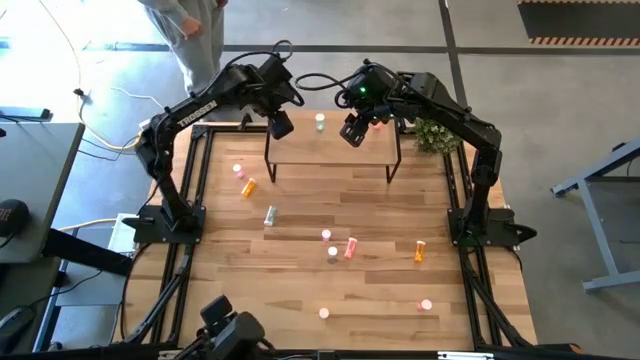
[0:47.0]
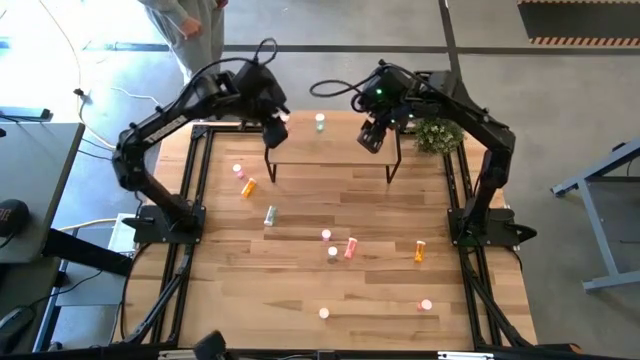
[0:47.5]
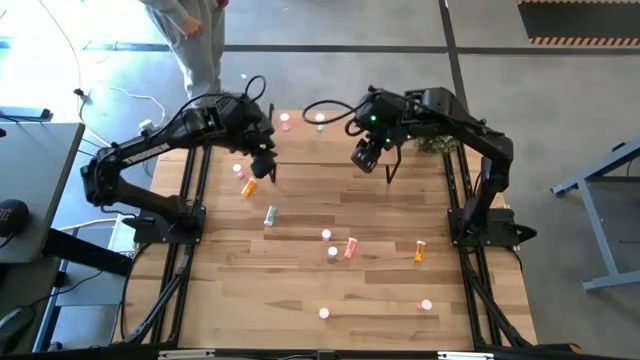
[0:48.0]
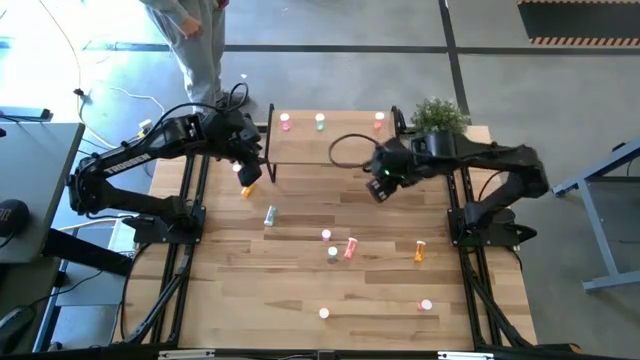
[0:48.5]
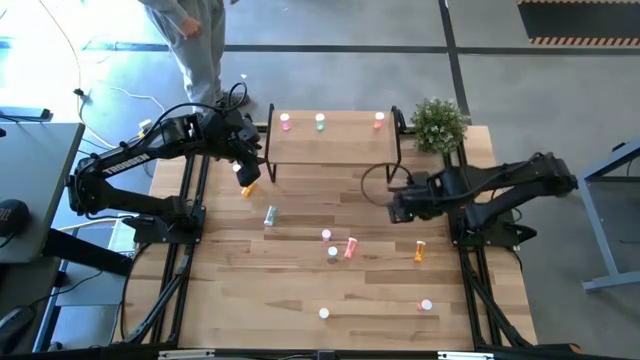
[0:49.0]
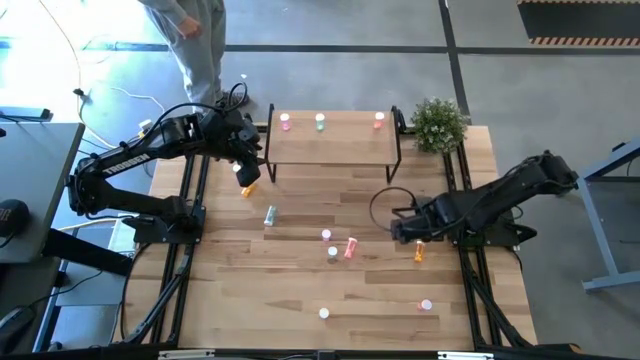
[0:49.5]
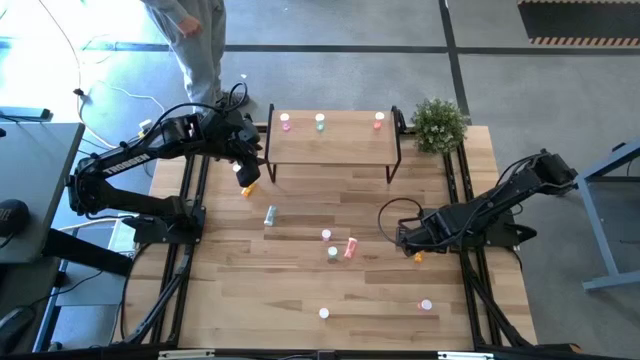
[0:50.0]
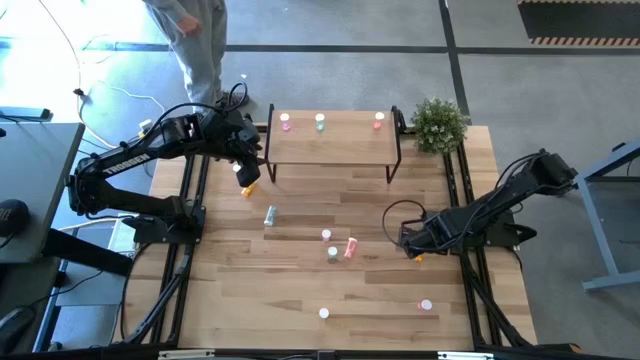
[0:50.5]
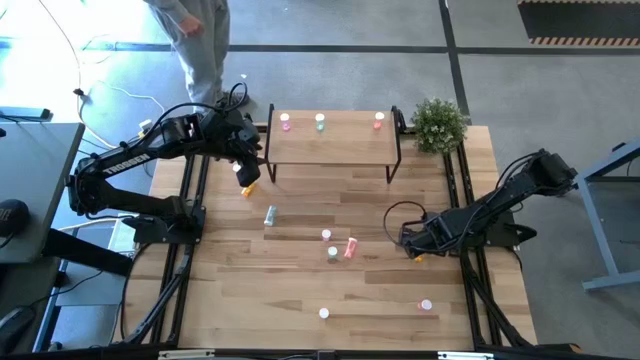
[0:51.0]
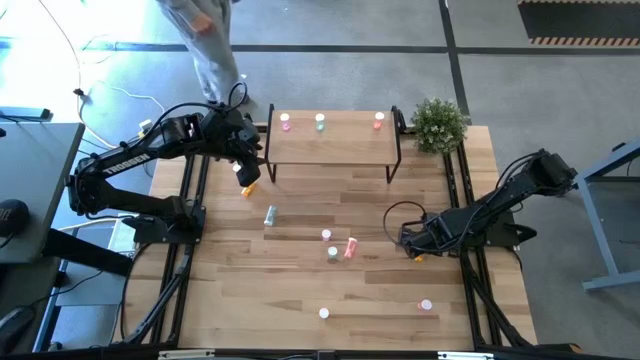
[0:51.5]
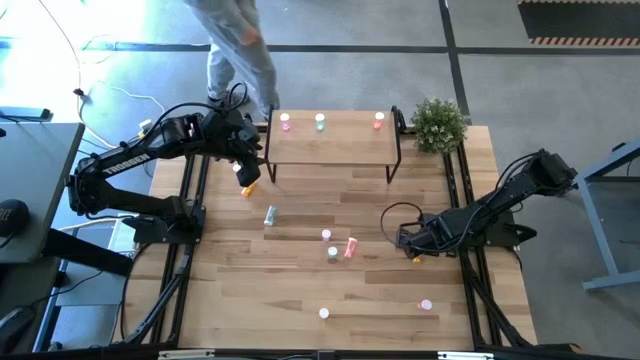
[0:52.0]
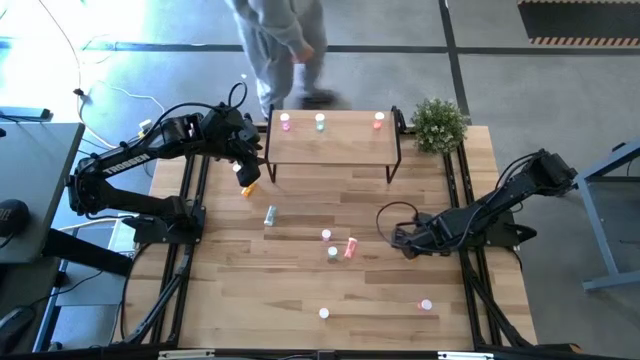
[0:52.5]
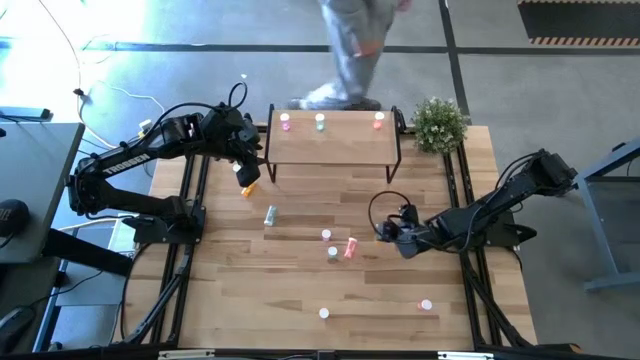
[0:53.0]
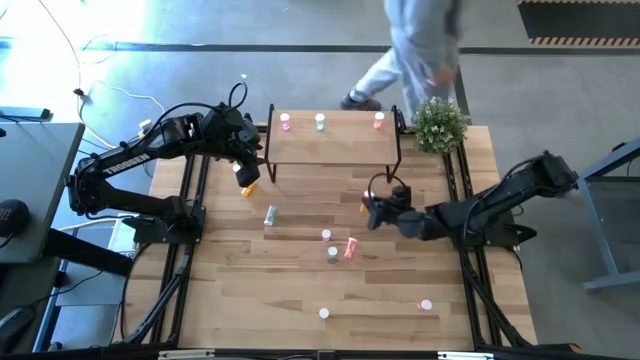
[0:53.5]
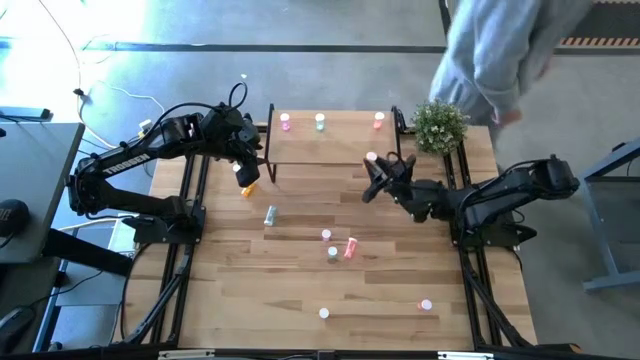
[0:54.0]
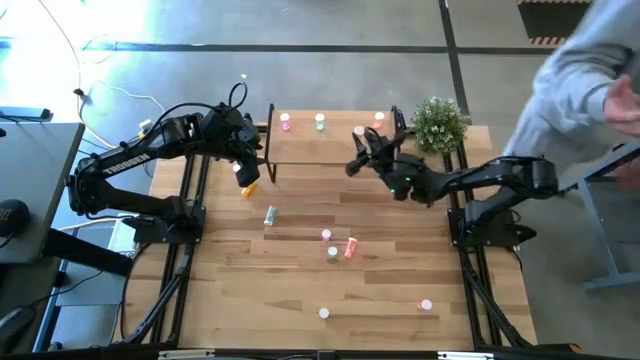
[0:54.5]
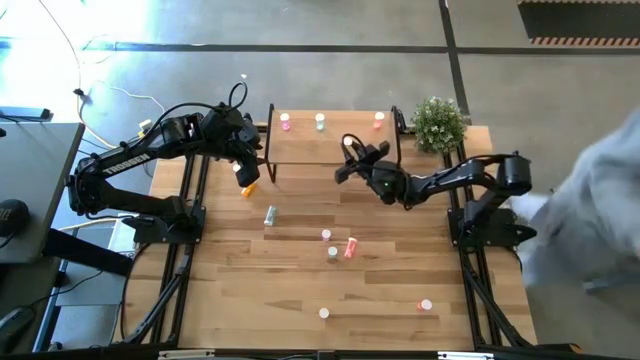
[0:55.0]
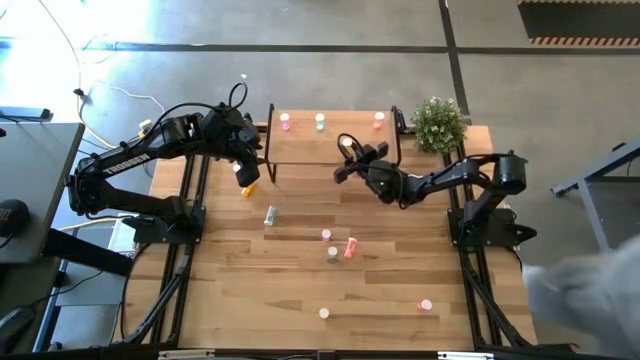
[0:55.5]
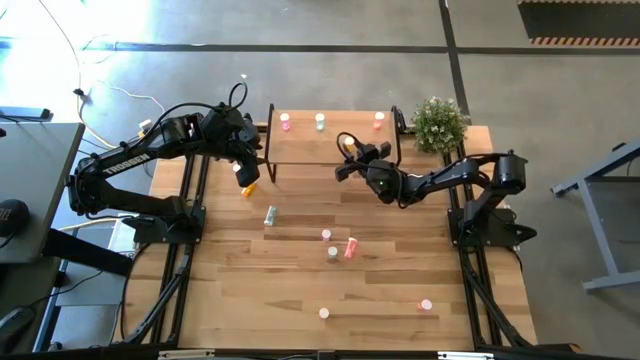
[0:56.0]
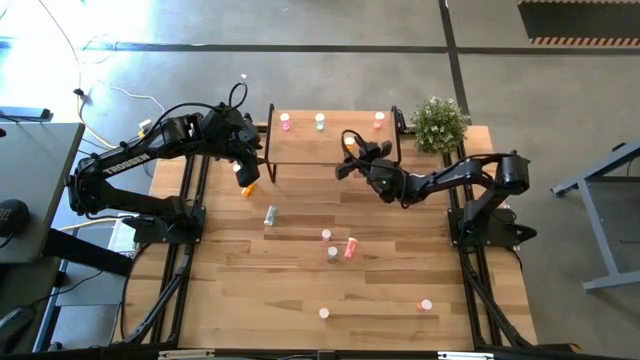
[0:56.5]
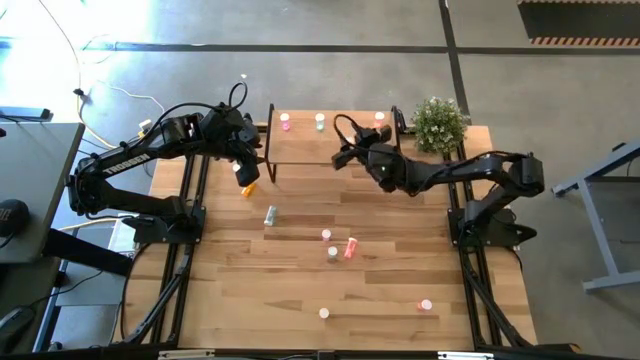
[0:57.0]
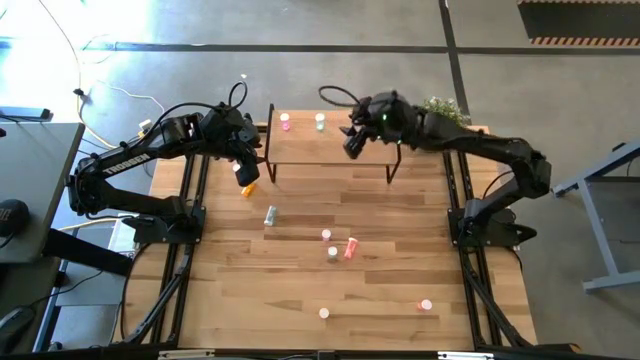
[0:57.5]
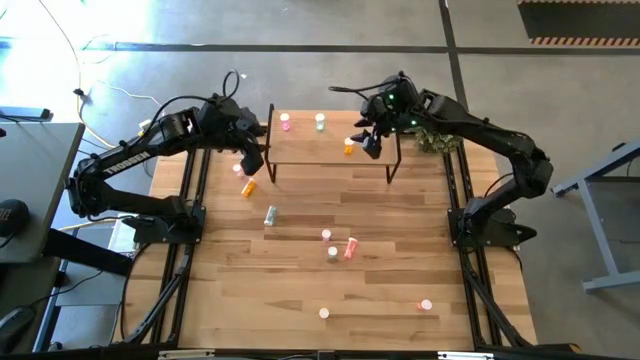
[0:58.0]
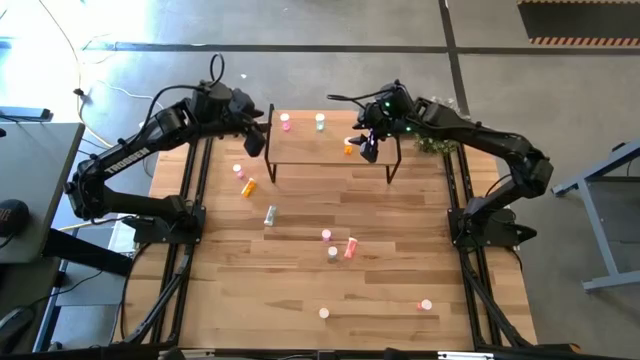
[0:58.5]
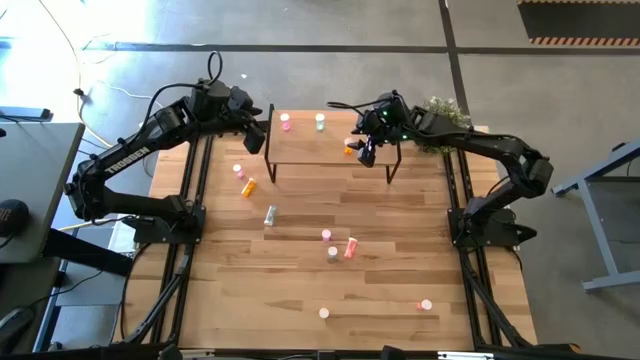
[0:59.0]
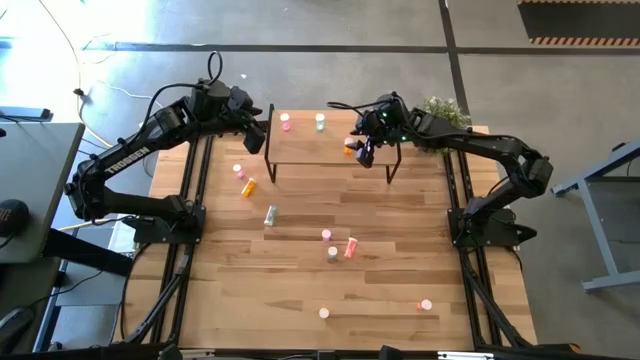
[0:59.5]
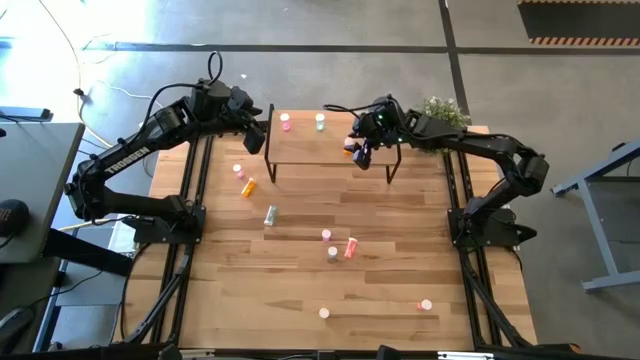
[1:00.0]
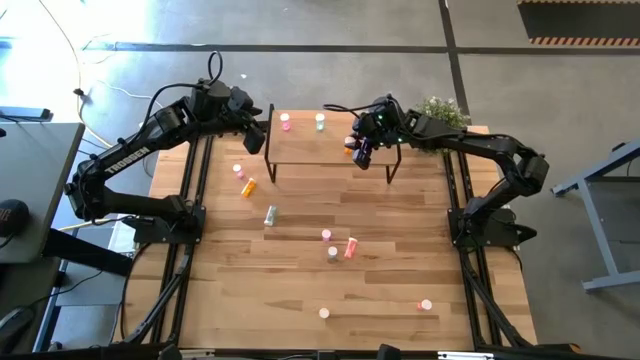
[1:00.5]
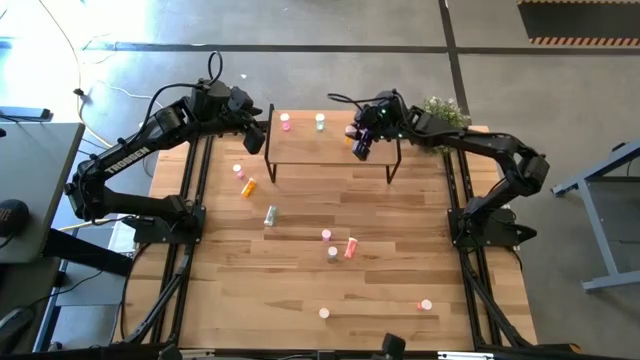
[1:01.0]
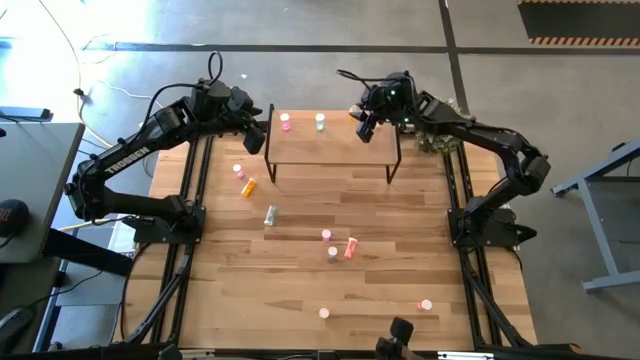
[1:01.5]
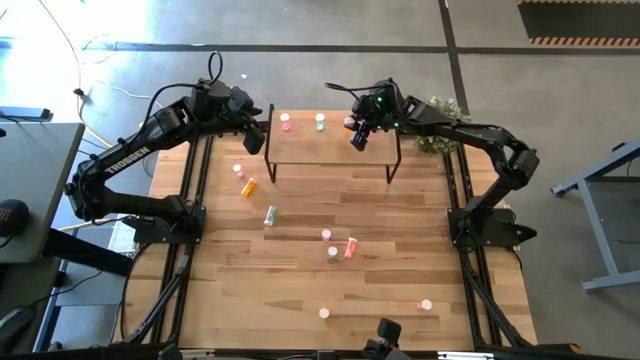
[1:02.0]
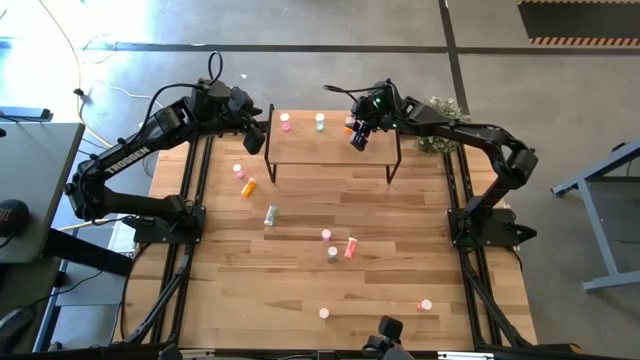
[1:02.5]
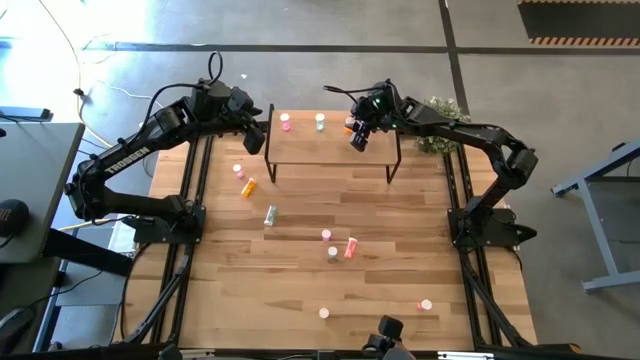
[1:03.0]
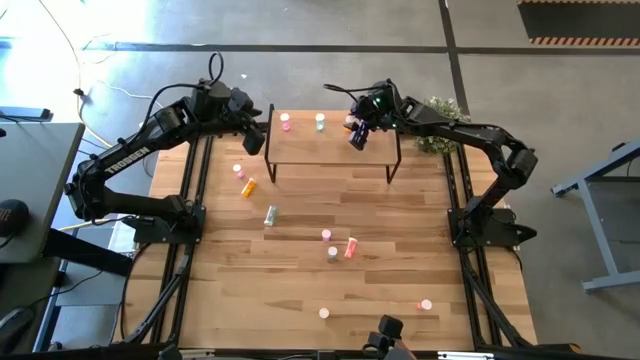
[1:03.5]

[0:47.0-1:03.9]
Task: Pick and place medicine bottles onto shelf by color
Put the middle right yellow pill bottle on the shelf

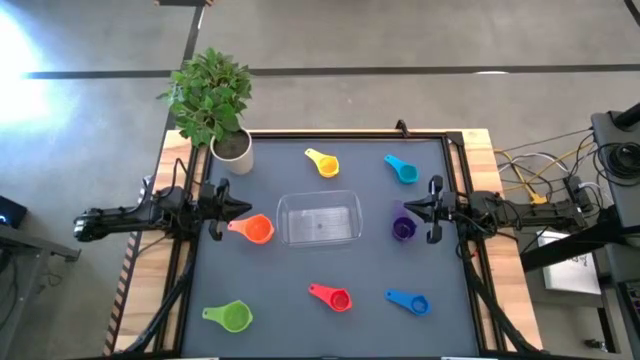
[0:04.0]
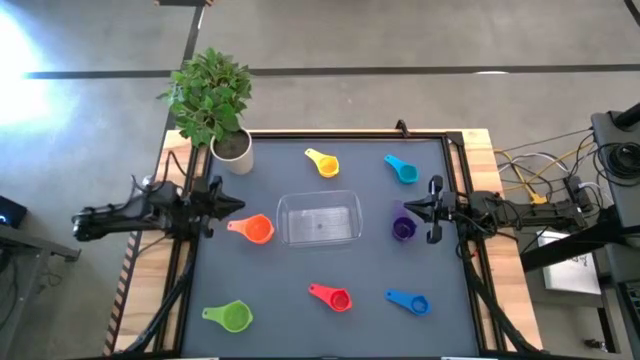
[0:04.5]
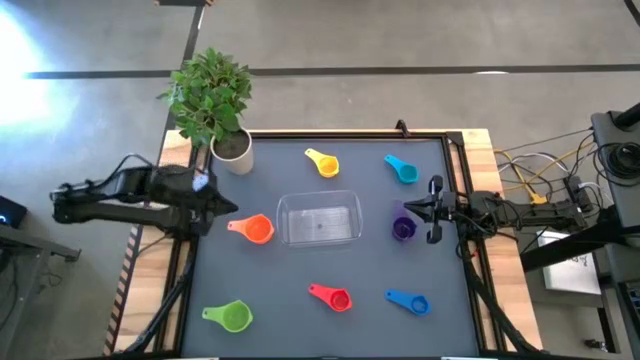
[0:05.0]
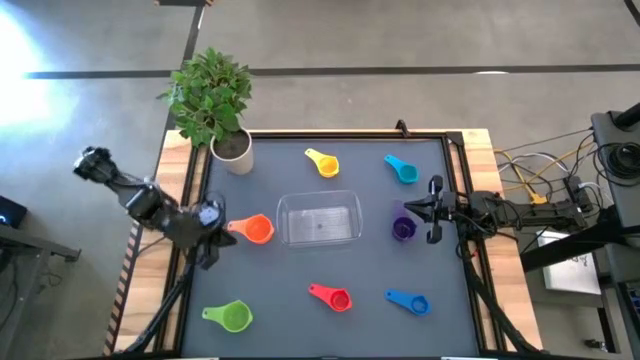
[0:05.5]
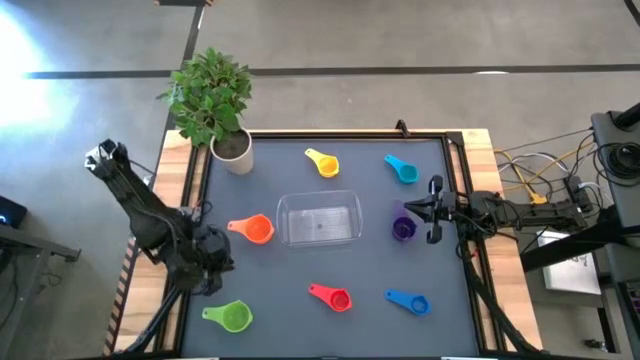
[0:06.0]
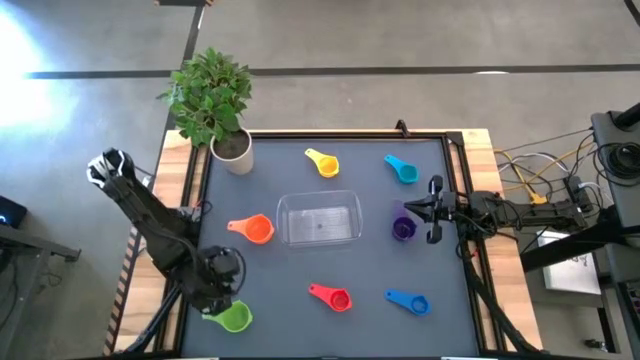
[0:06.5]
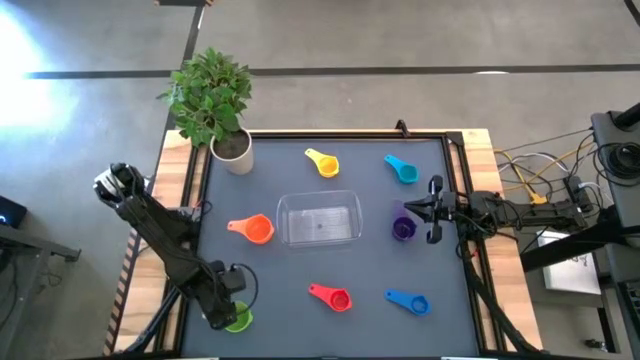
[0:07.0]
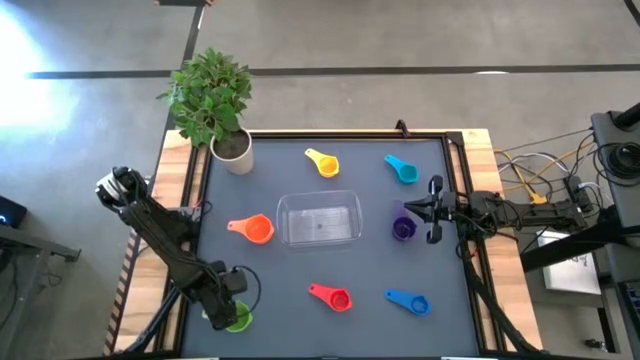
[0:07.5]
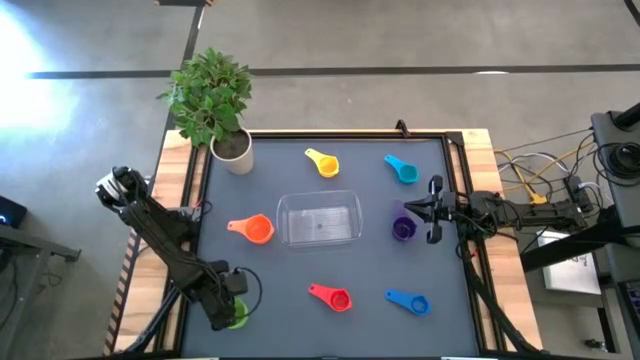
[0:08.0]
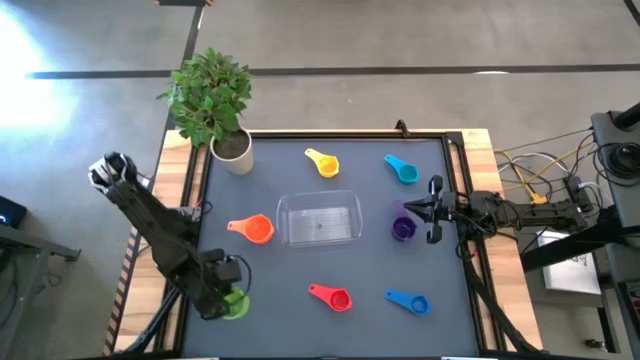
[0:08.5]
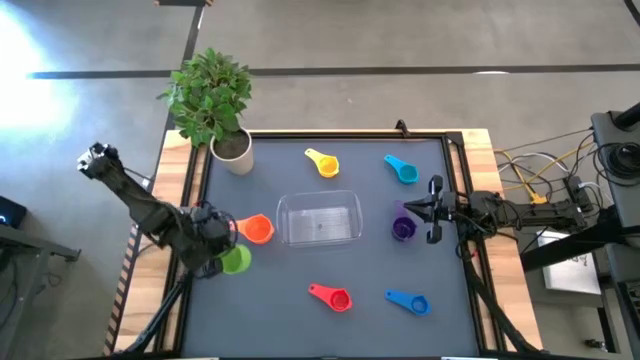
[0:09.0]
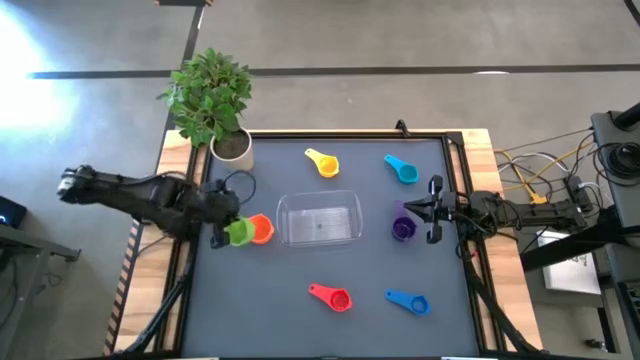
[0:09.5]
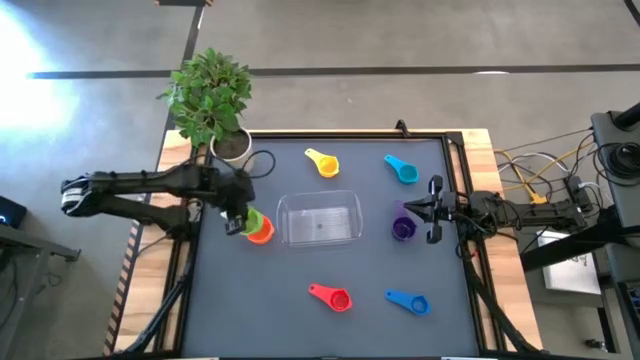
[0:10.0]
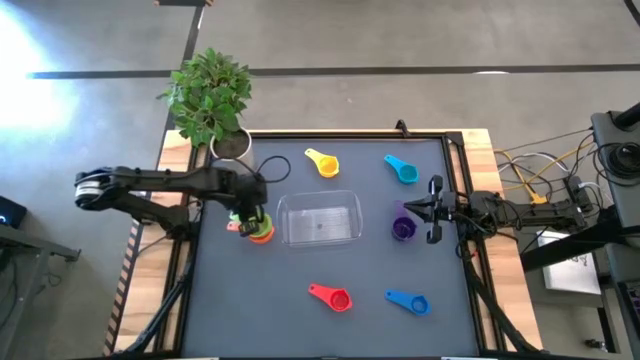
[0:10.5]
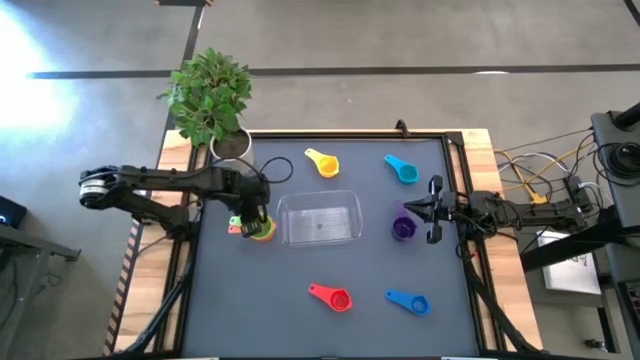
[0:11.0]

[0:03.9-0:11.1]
Task: Nest measuring cups in basket
Stack the green measuring cup on top of the orange measuring cup
